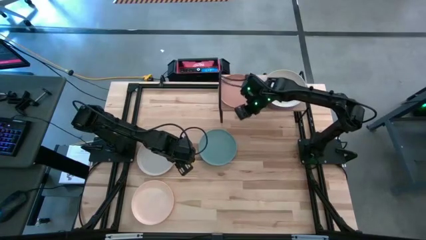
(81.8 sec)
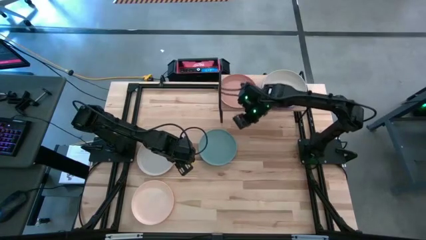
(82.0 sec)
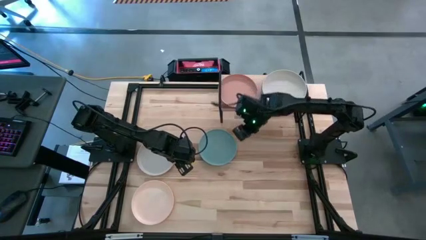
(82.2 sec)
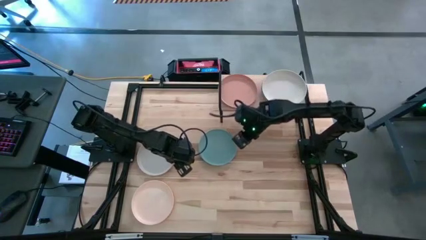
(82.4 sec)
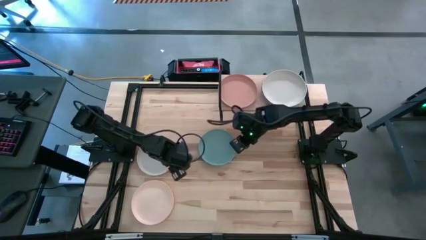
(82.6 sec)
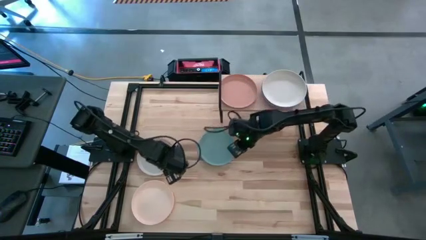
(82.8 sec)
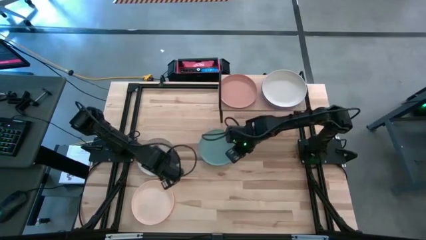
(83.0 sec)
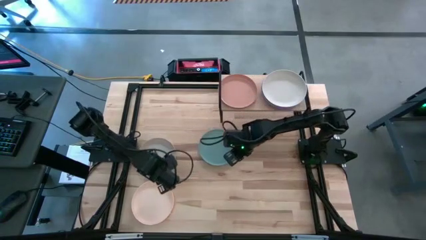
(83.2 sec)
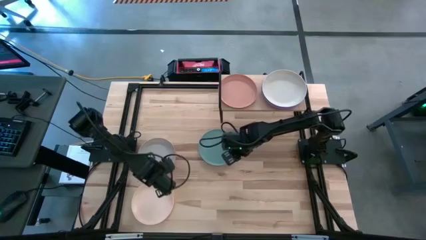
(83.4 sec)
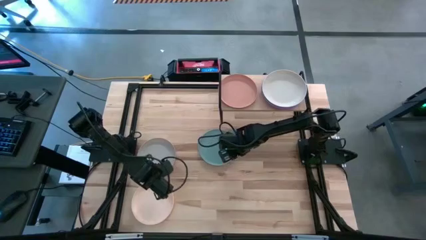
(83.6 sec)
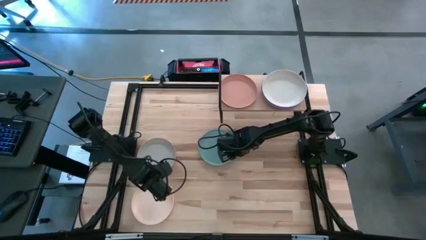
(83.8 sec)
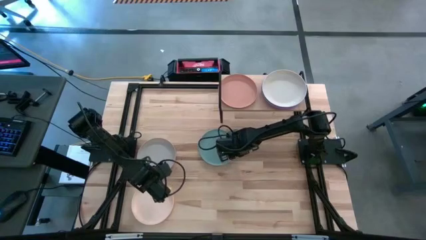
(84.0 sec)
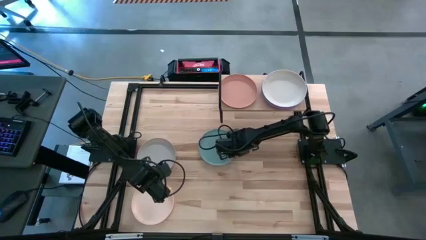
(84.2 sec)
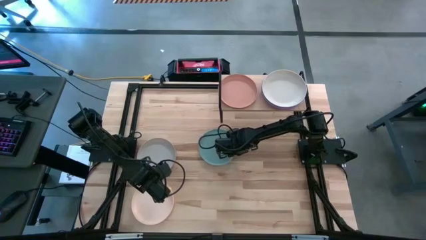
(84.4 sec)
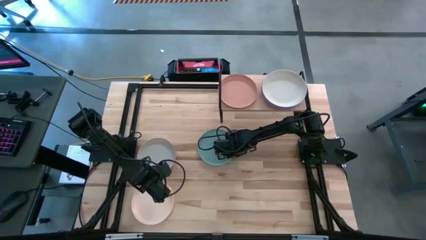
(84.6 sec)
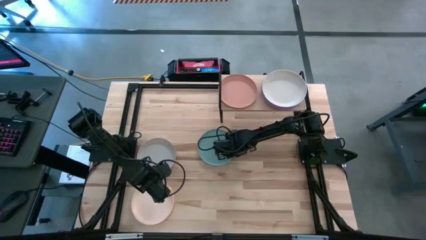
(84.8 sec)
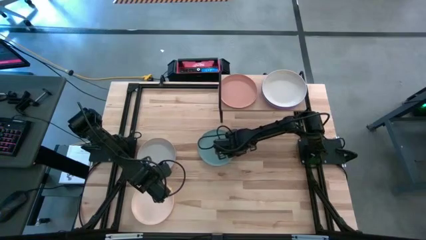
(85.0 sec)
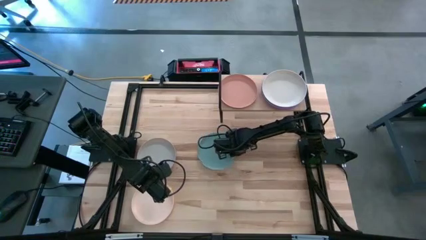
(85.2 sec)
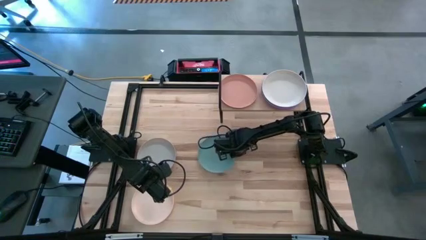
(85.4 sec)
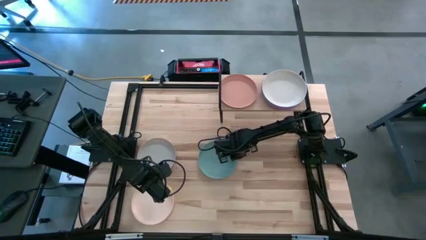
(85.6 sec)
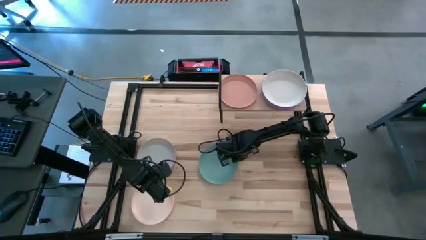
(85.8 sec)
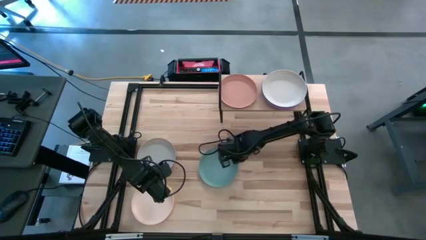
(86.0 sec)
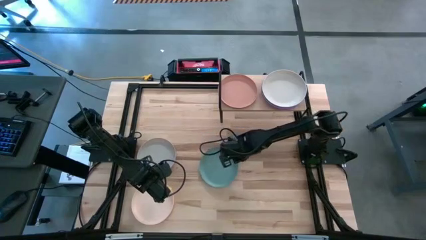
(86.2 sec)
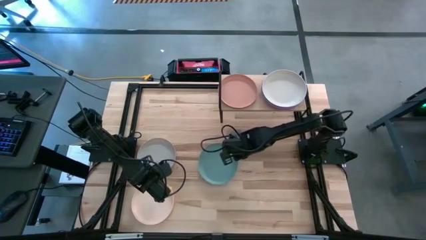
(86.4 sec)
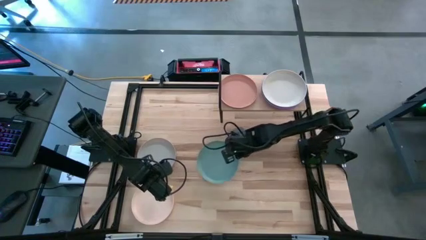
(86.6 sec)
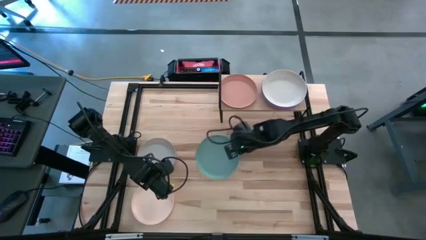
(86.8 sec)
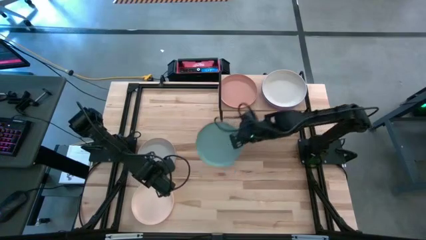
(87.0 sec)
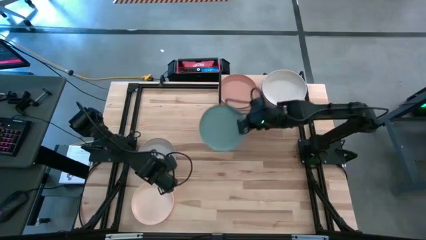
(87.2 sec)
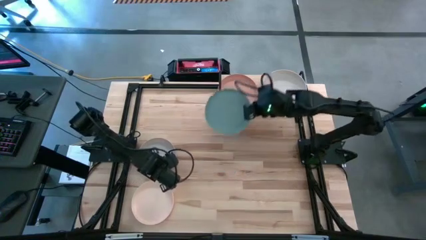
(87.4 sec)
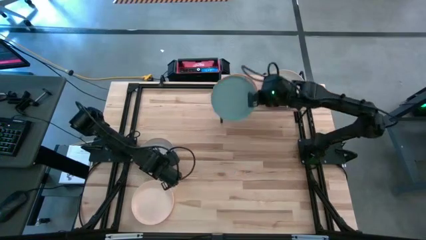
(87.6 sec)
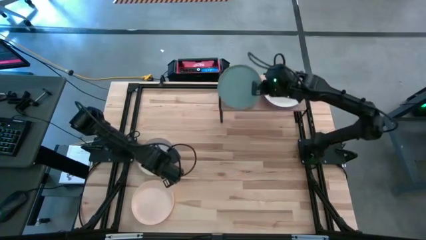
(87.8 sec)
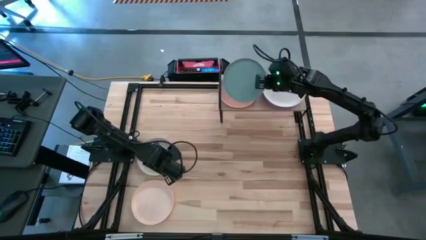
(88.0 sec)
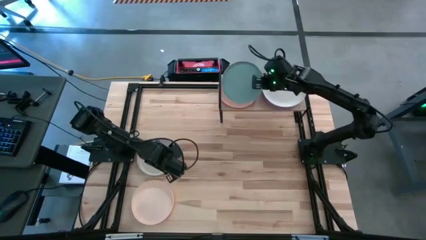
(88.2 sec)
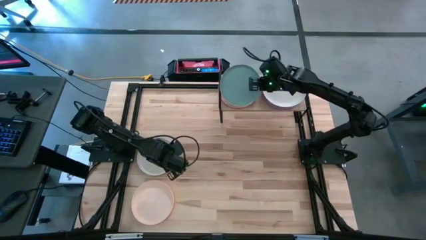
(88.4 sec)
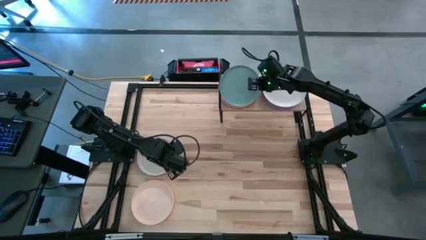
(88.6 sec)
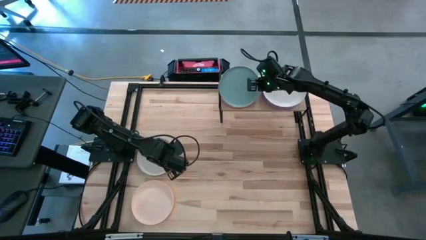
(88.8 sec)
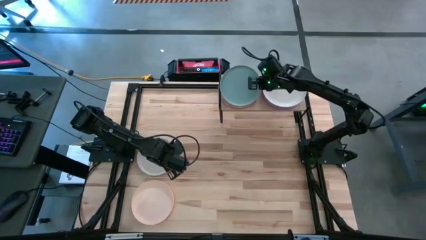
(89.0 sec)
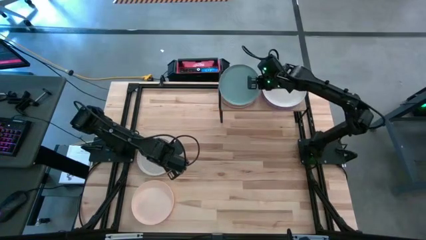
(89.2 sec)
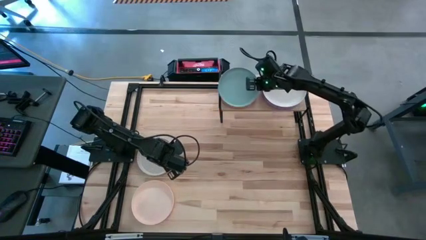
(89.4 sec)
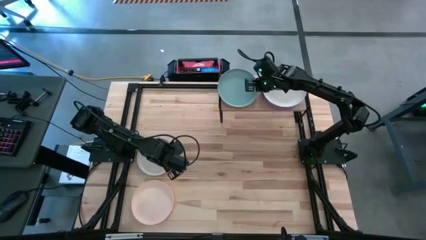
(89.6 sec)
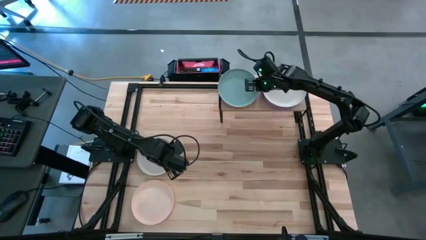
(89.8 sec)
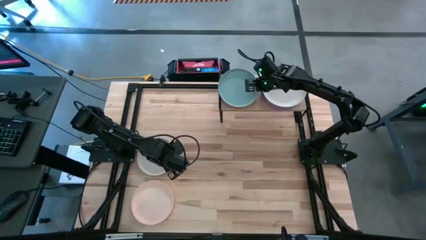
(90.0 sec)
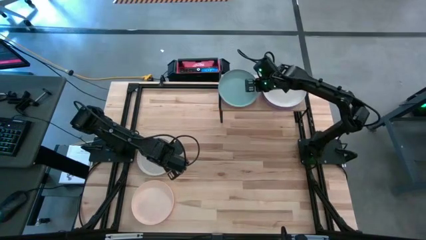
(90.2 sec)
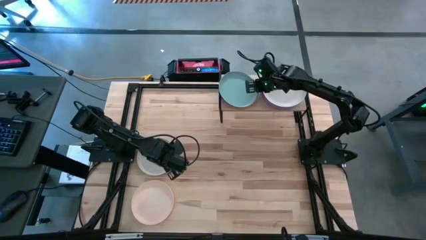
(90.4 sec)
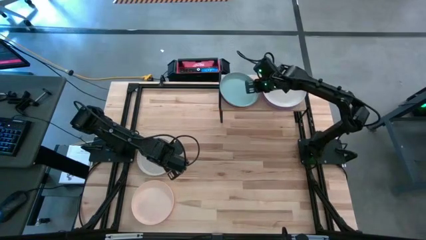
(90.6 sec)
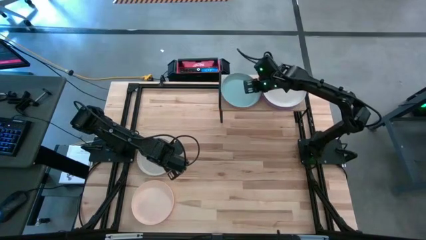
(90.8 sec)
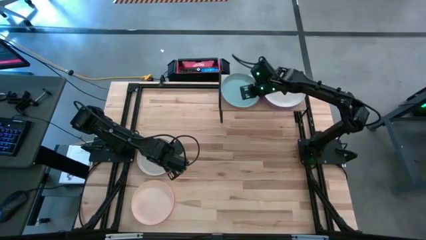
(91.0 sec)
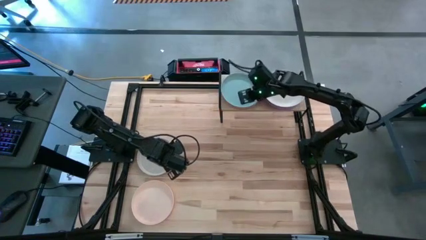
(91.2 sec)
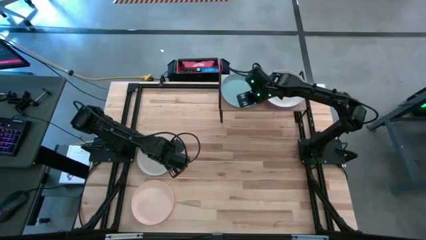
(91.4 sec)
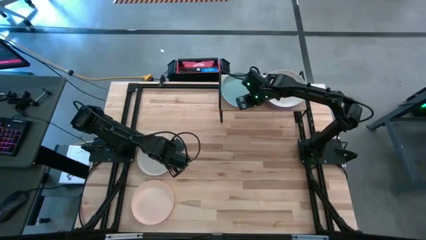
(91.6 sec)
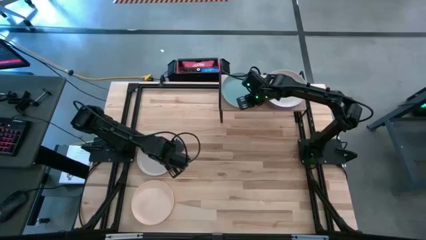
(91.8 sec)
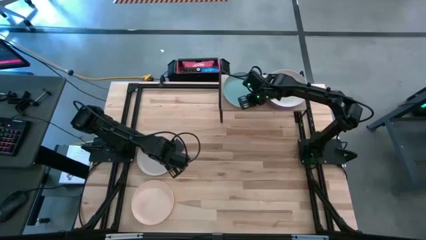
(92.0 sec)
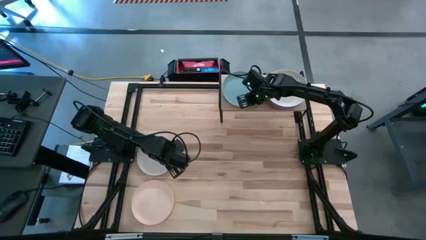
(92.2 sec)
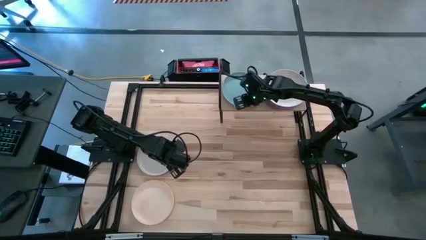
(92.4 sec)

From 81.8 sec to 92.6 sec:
Task: Place and stack plates onto a shelf
Stack the light blue plate on top of the brown plate on the shelf

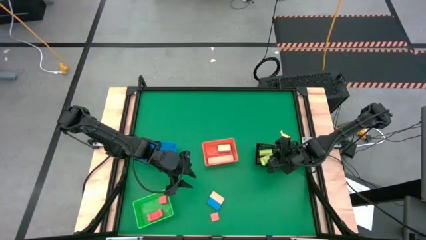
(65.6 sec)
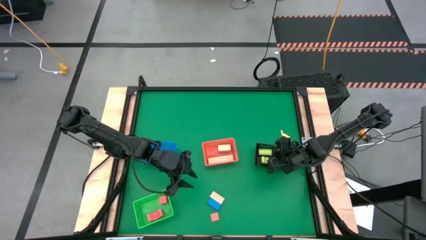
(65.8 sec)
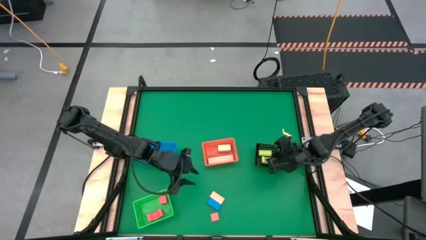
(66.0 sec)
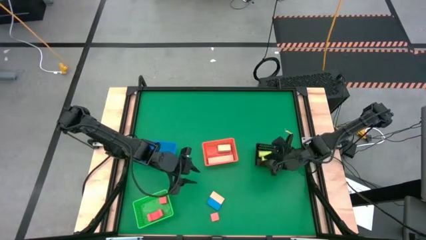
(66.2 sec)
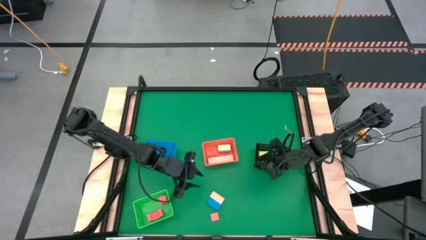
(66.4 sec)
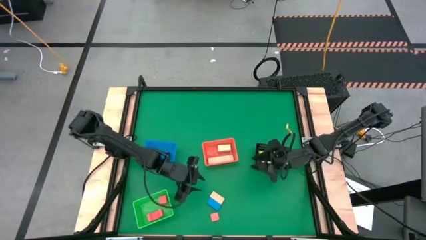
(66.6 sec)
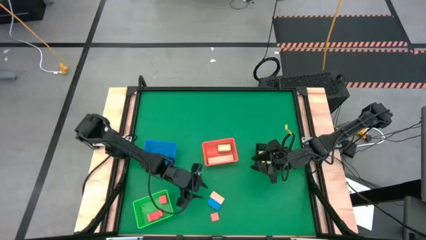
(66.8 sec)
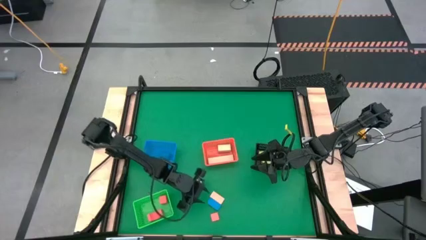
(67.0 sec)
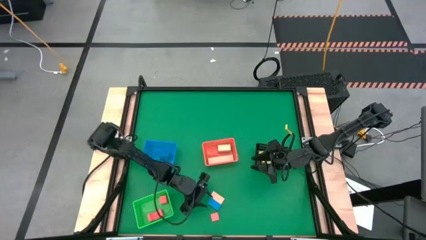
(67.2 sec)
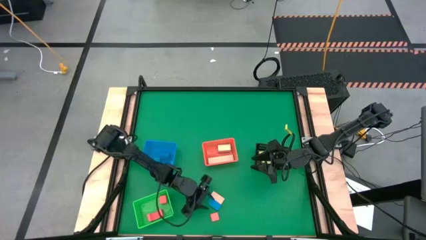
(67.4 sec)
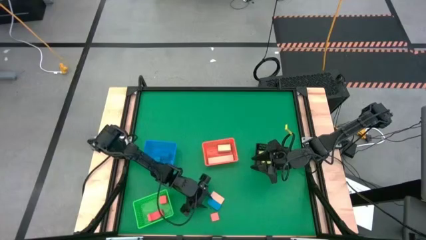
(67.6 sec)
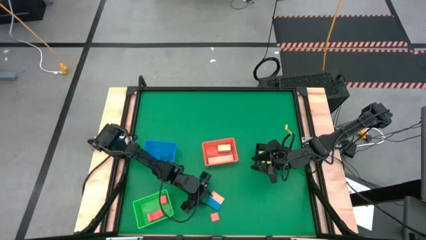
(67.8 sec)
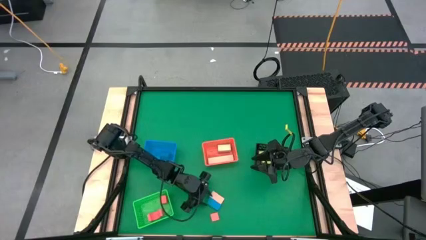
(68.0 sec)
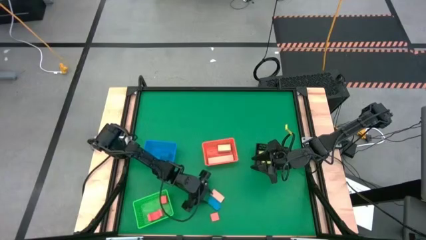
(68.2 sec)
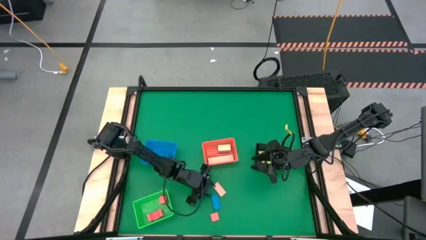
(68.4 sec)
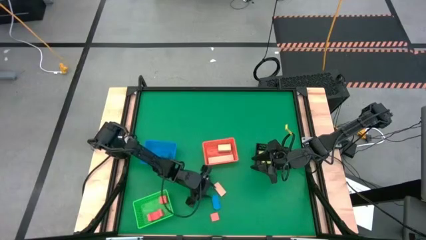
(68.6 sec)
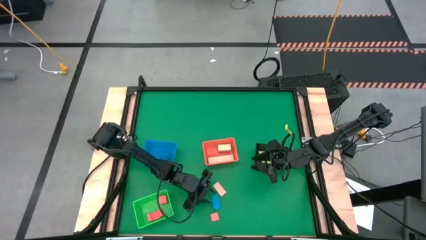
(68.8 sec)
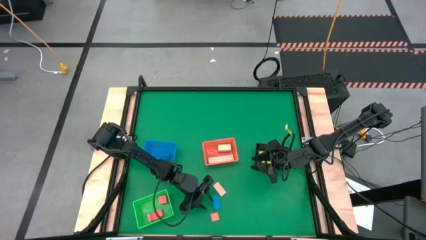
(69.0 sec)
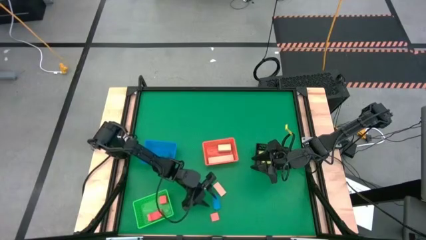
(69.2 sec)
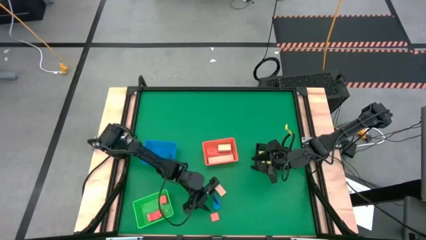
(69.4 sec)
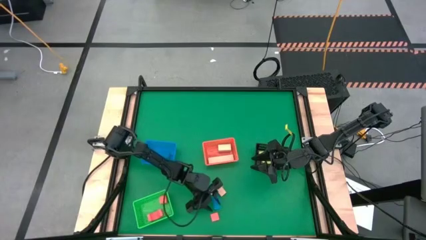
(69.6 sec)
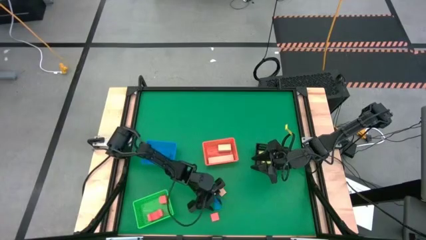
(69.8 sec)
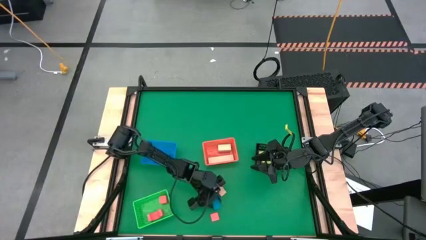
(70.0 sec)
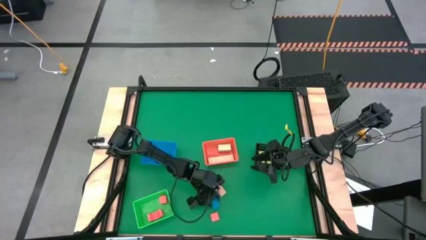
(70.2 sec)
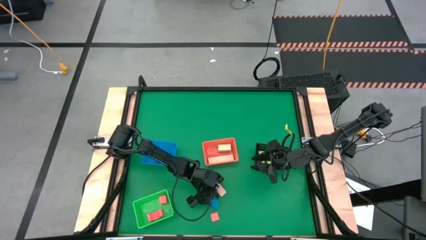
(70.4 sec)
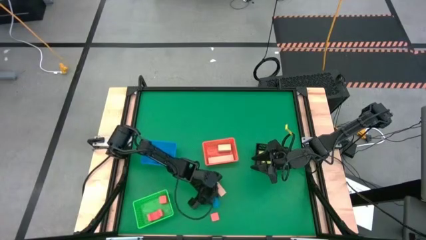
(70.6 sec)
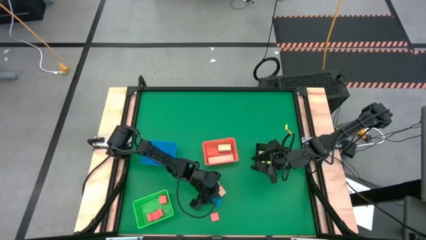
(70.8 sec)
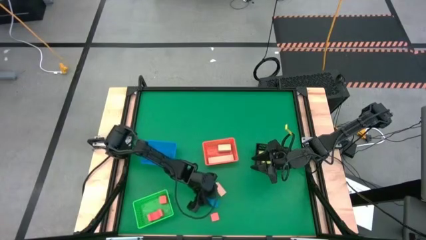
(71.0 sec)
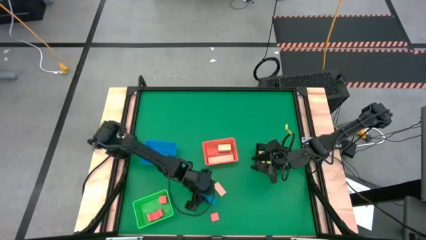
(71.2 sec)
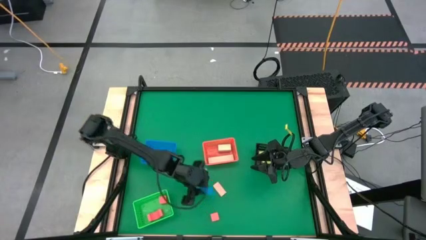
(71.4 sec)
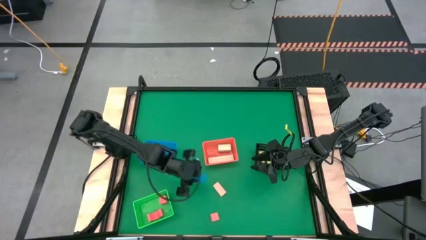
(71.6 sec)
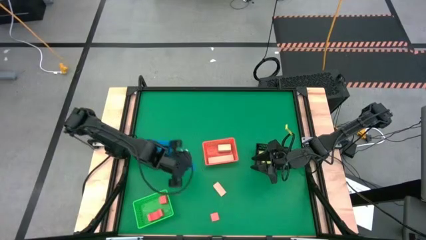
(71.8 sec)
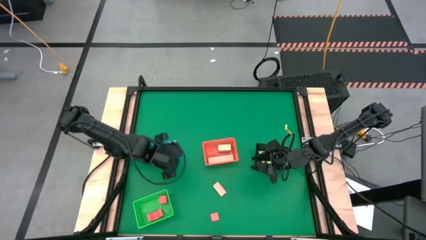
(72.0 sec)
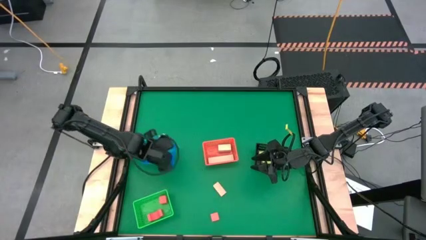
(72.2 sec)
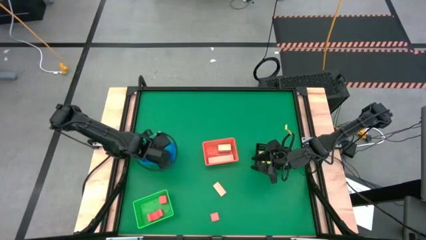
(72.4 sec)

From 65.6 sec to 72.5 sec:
Task: Sort & place blocks by color
Put the blue block into the blue bin
